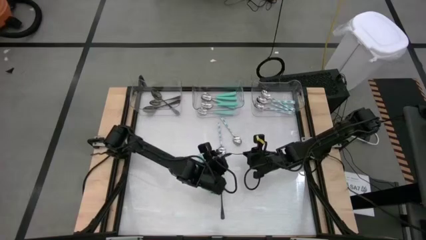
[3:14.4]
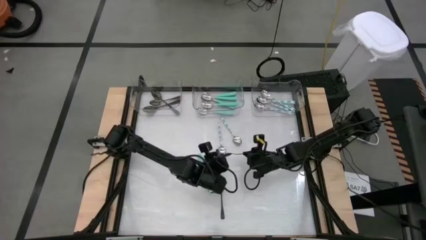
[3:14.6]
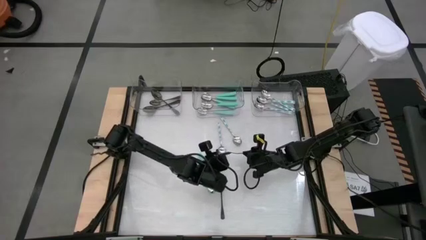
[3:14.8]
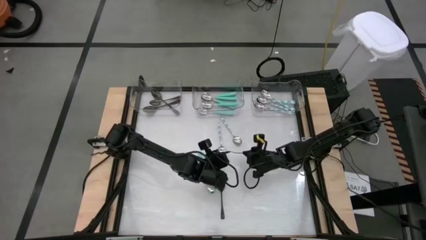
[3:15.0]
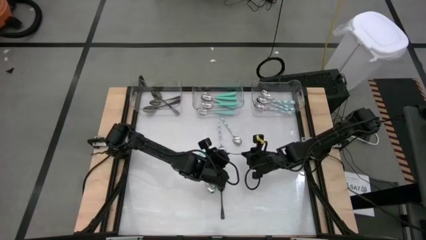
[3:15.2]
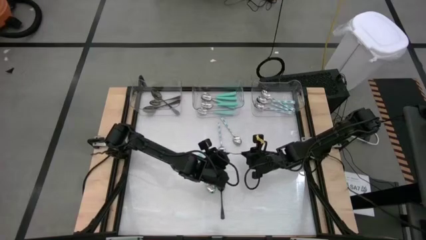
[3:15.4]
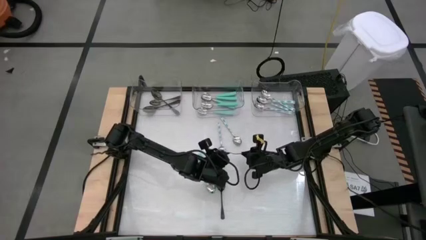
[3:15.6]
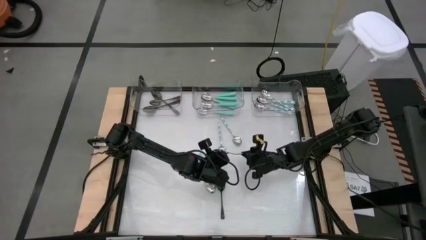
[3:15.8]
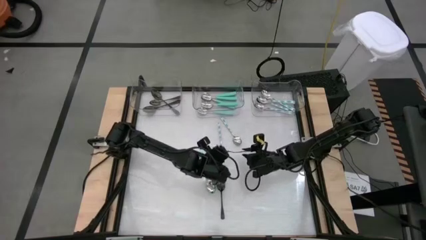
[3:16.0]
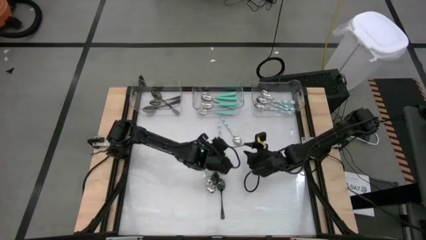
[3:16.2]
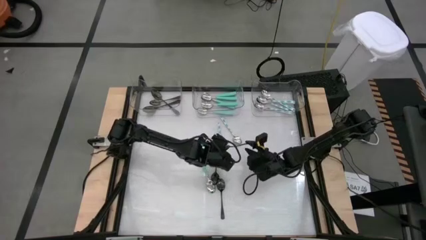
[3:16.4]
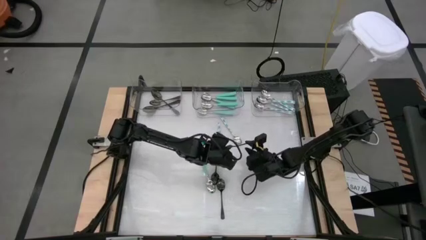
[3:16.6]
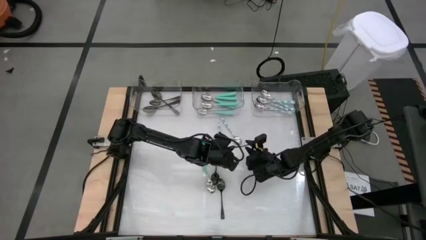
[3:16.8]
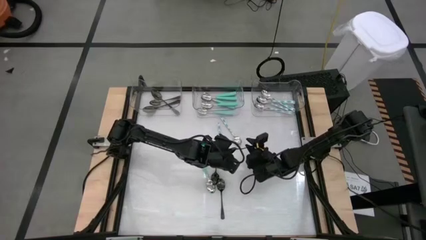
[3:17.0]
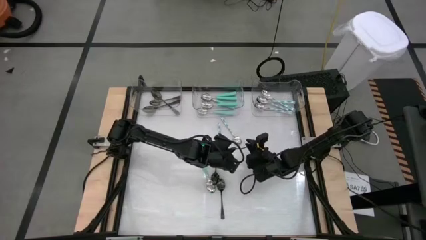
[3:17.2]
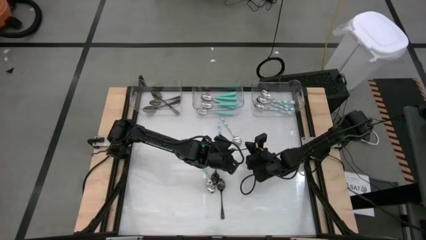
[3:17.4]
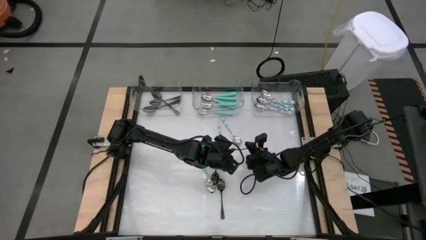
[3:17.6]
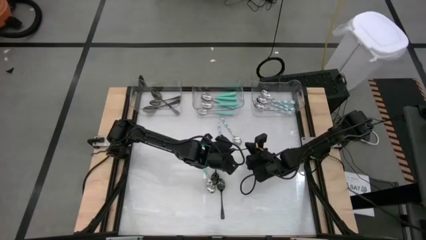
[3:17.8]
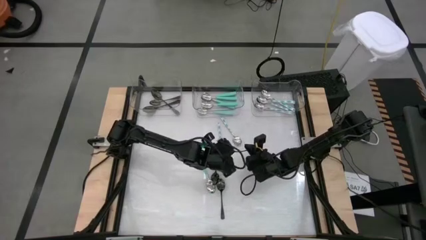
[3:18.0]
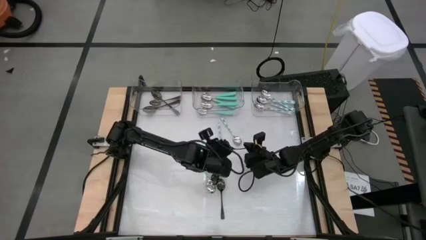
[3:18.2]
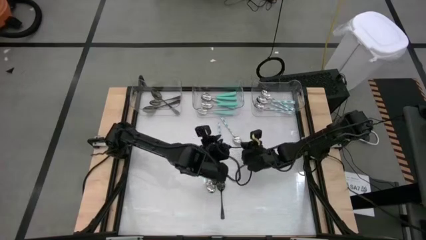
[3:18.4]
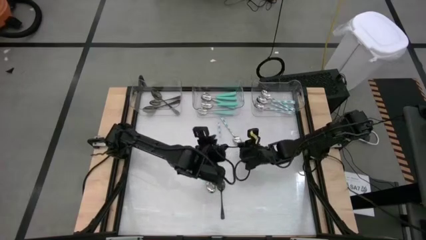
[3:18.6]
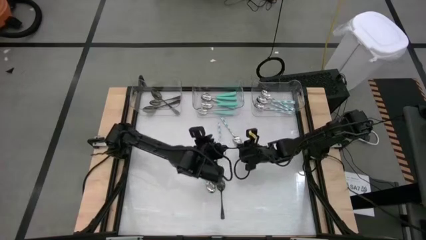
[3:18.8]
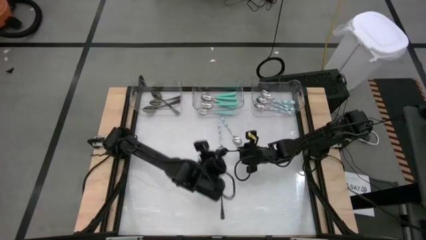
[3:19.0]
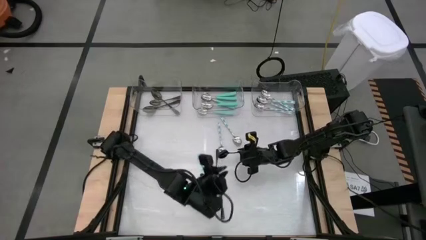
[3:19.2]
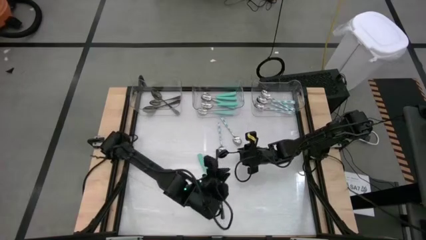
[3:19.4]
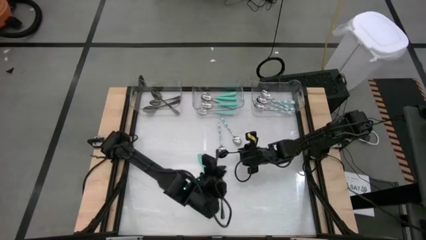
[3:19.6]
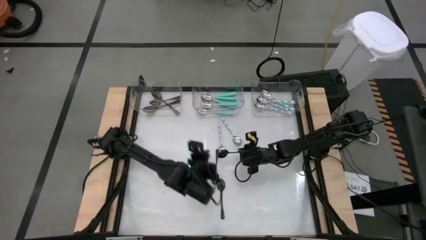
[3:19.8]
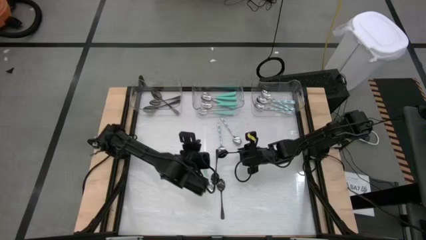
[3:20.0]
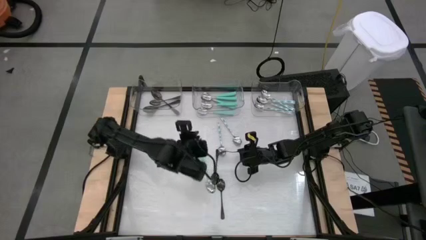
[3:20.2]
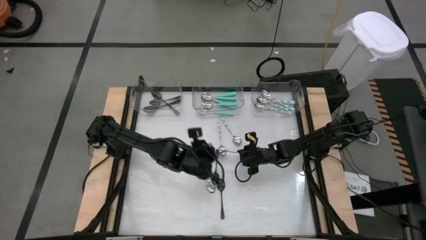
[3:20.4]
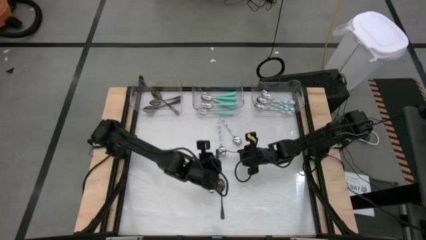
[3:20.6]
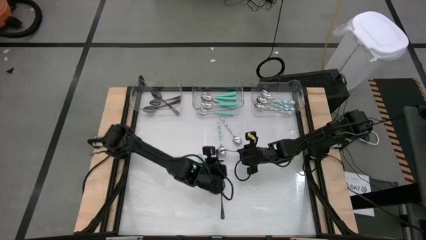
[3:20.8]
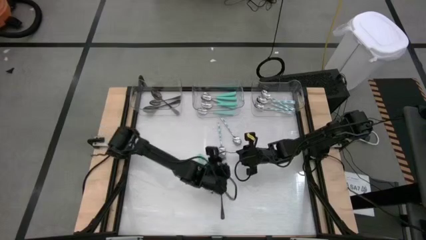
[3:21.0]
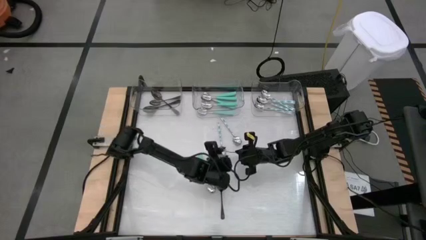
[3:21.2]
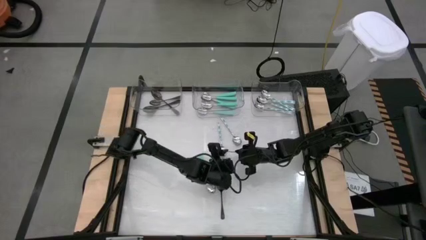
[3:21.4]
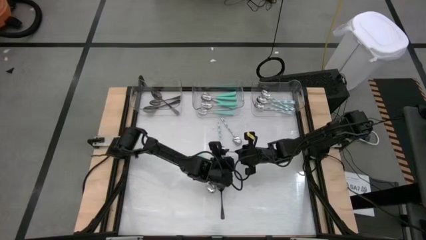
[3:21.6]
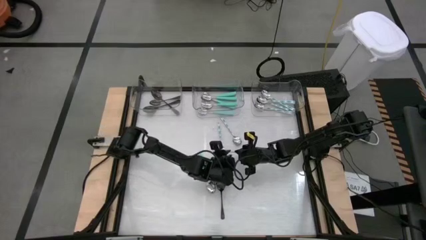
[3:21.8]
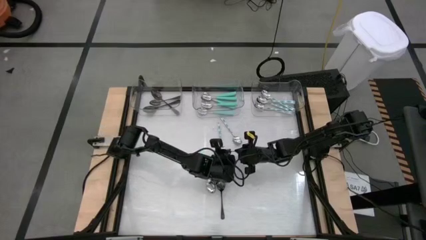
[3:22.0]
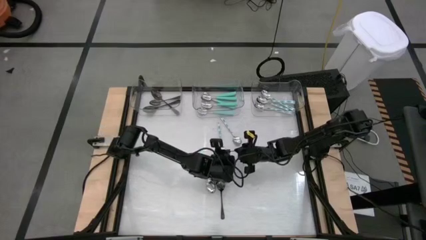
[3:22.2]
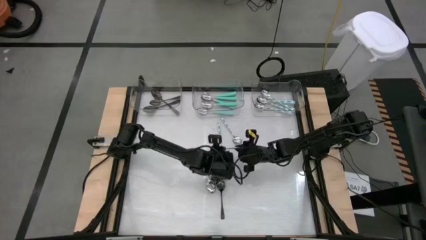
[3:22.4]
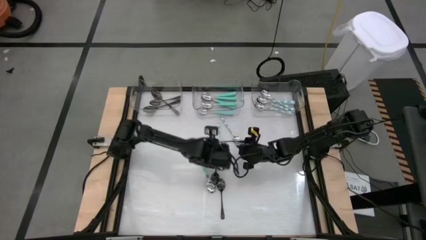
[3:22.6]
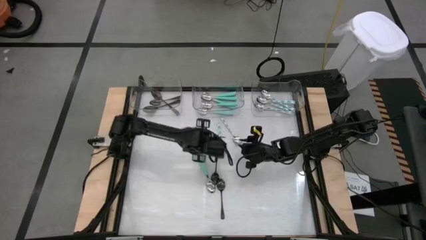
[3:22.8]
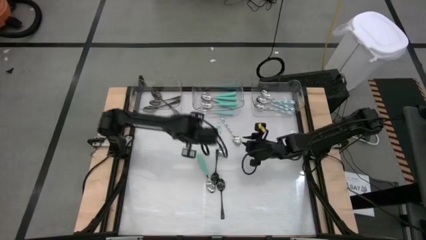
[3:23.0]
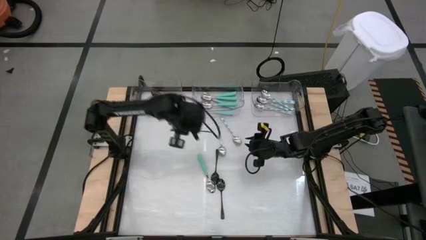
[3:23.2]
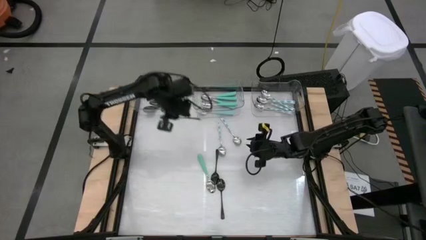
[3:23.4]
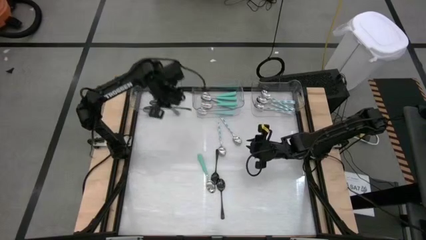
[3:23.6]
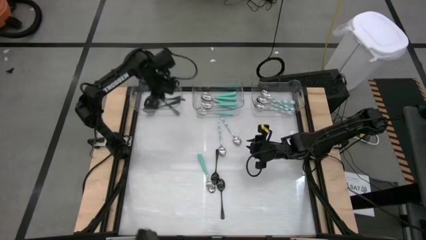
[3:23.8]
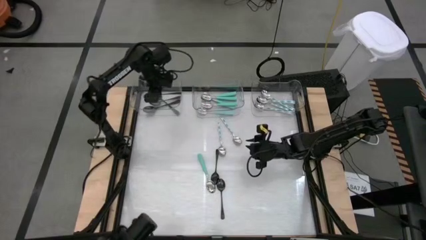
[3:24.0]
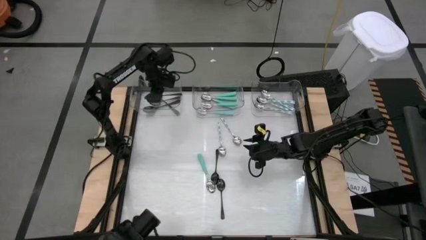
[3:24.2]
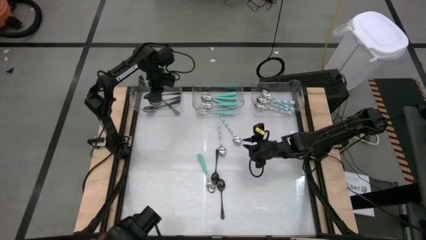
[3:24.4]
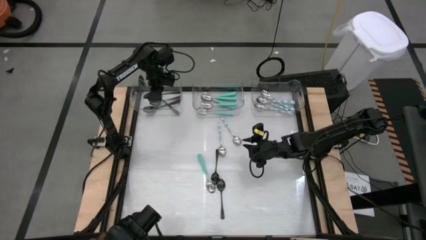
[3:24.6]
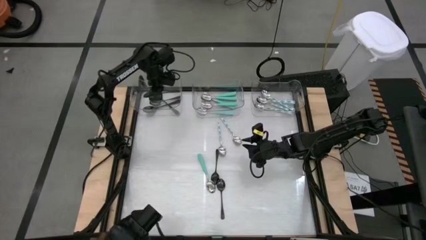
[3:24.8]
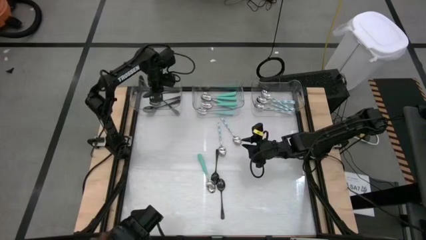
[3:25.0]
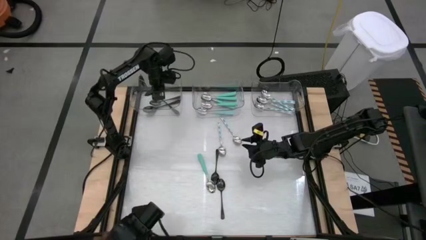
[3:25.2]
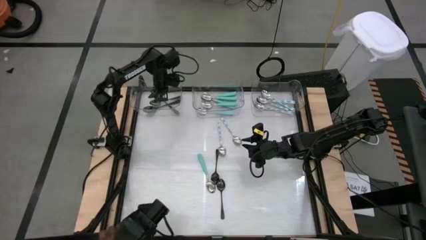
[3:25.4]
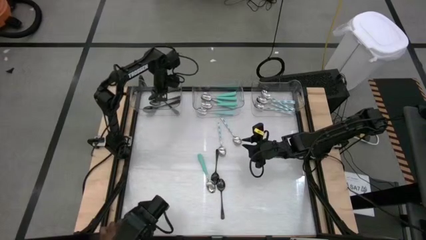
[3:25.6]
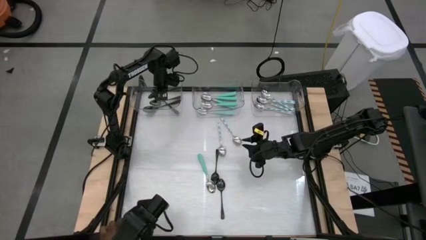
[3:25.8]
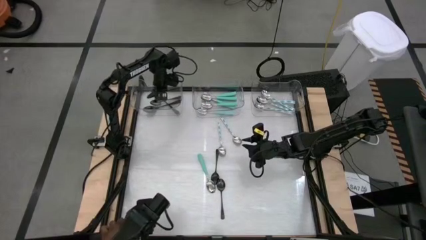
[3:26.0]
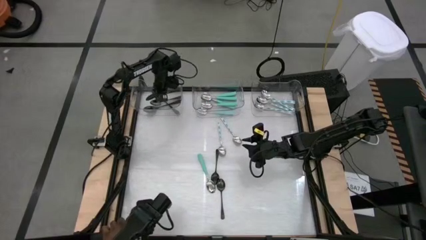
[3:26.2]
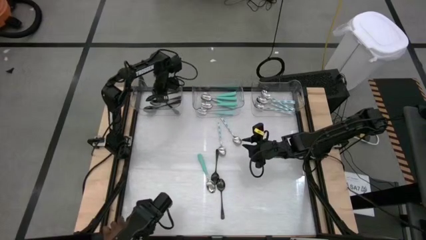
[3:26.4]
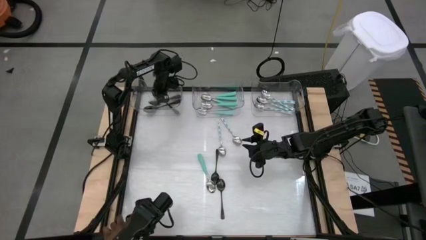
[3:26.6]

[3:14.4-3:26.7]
Task: Sort silverware by color (type)
Put the black spoon into the left transparent bin
